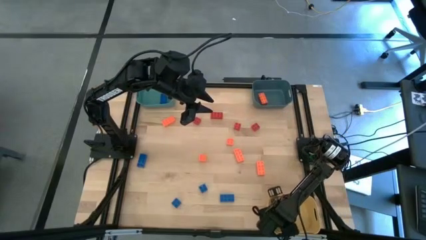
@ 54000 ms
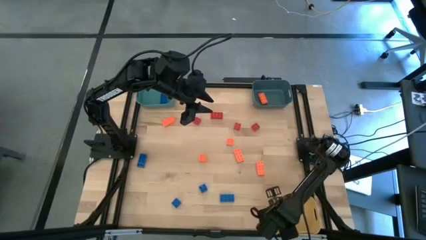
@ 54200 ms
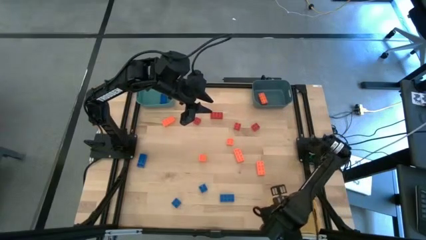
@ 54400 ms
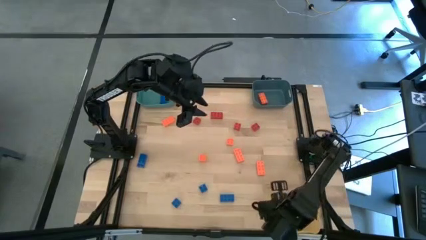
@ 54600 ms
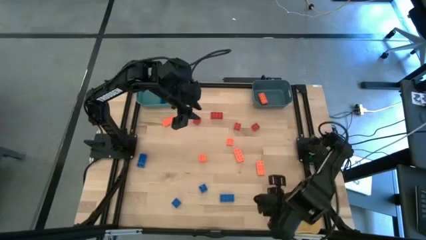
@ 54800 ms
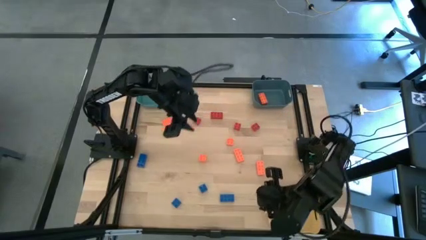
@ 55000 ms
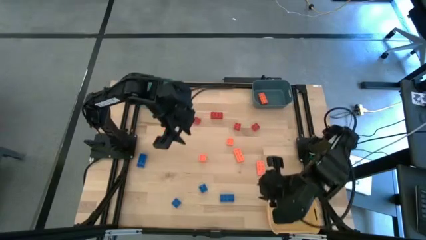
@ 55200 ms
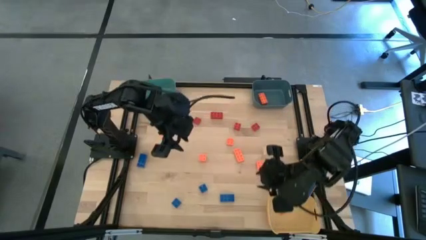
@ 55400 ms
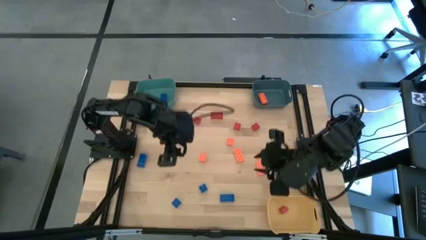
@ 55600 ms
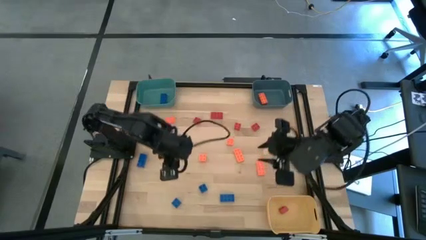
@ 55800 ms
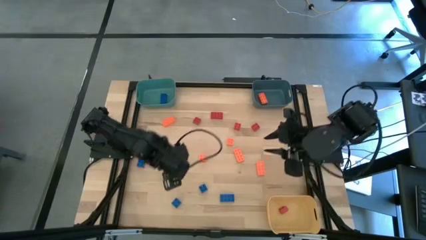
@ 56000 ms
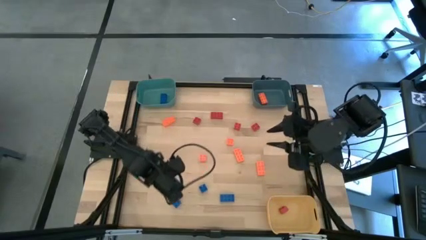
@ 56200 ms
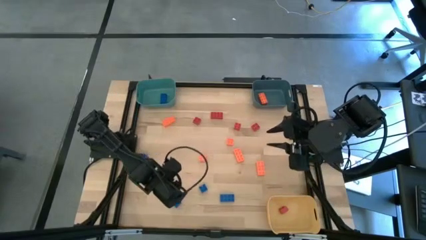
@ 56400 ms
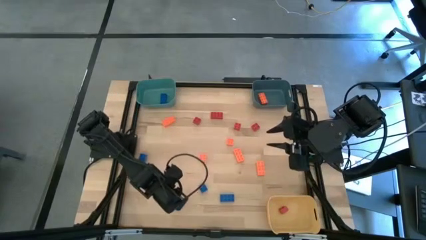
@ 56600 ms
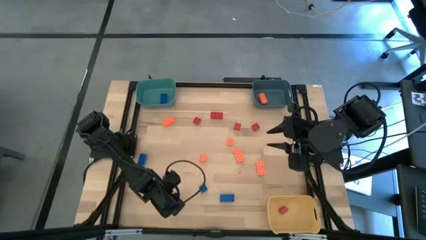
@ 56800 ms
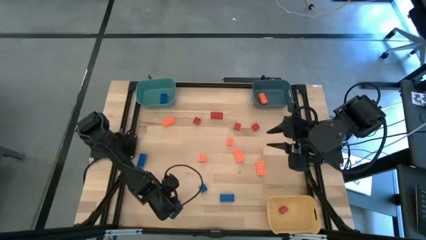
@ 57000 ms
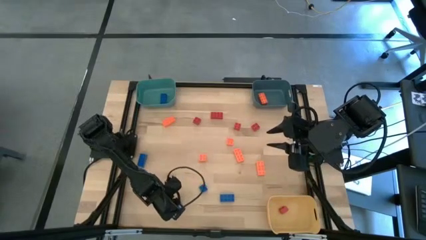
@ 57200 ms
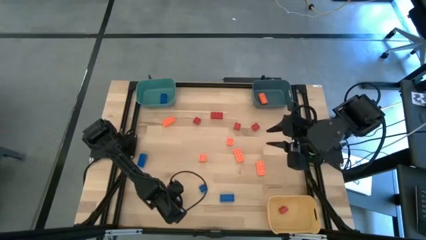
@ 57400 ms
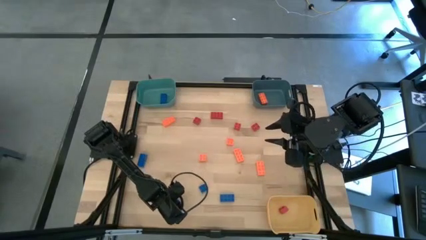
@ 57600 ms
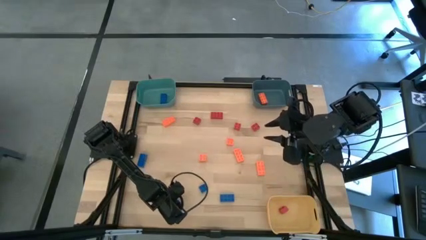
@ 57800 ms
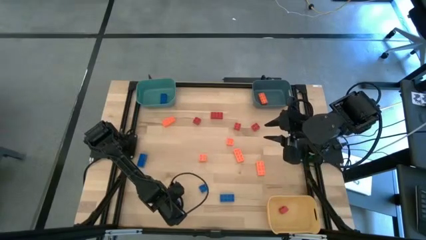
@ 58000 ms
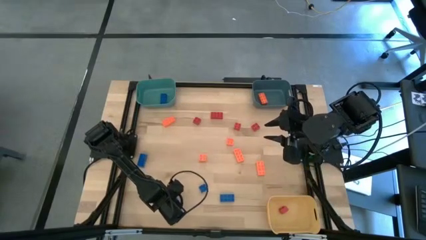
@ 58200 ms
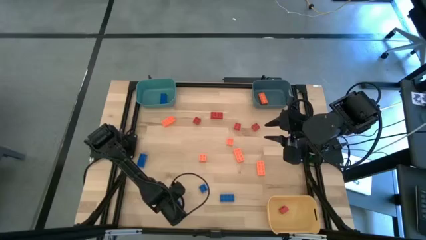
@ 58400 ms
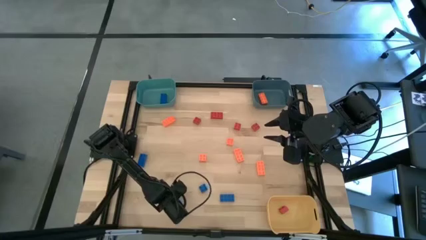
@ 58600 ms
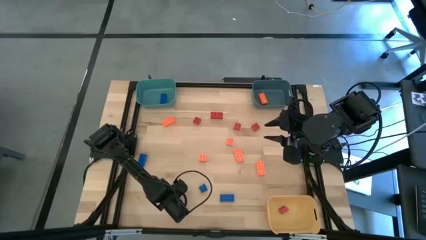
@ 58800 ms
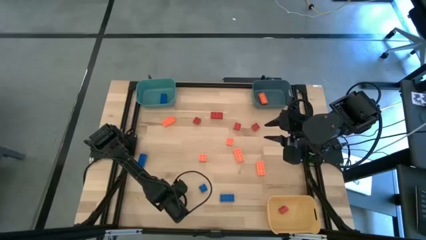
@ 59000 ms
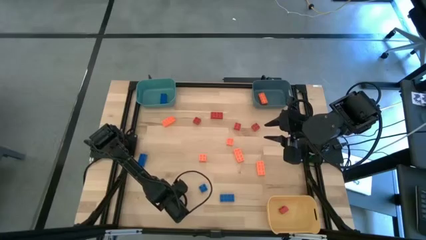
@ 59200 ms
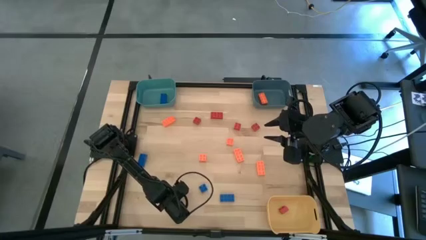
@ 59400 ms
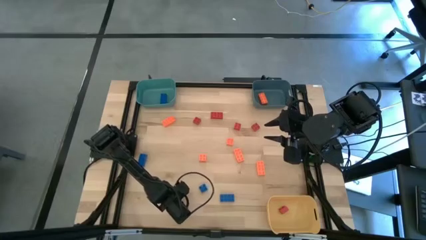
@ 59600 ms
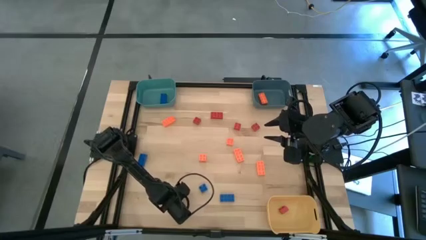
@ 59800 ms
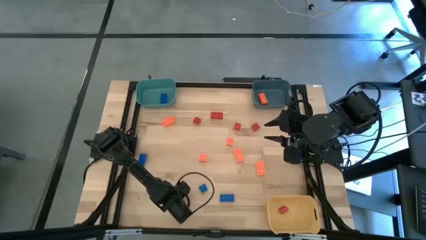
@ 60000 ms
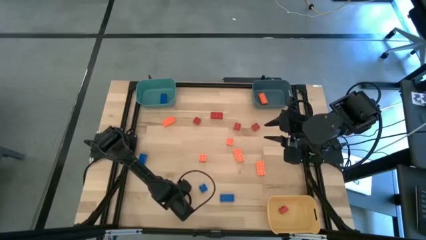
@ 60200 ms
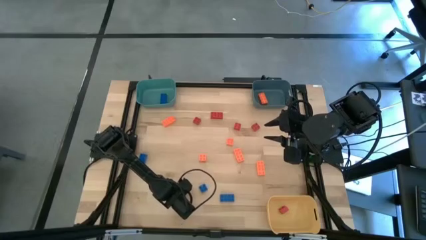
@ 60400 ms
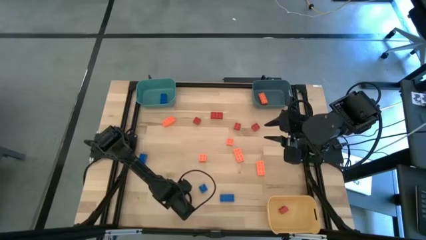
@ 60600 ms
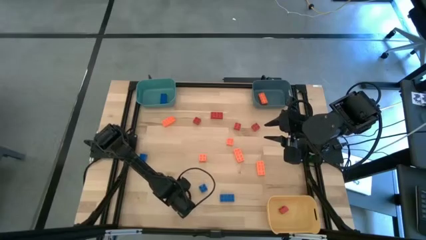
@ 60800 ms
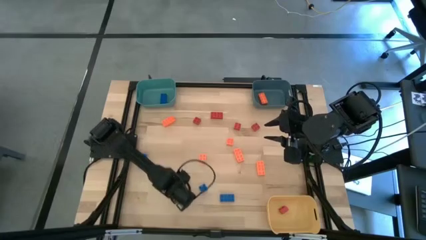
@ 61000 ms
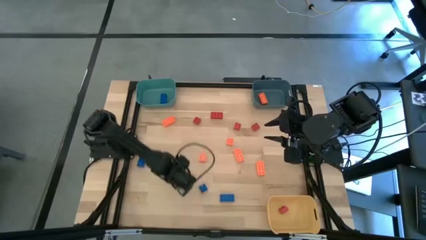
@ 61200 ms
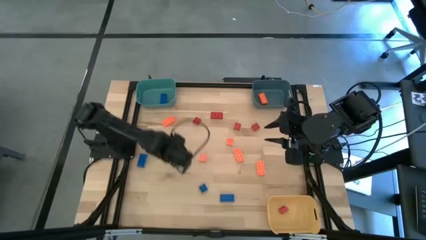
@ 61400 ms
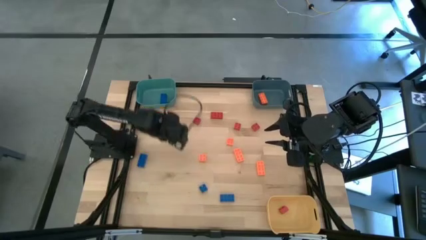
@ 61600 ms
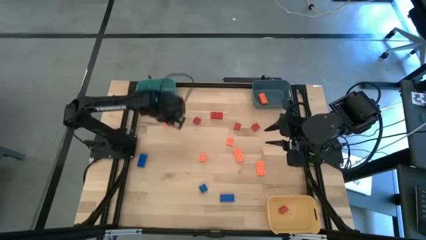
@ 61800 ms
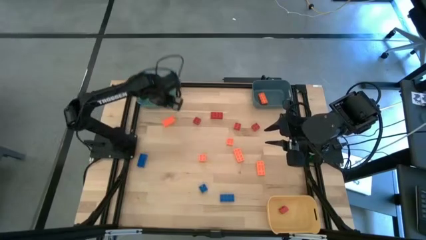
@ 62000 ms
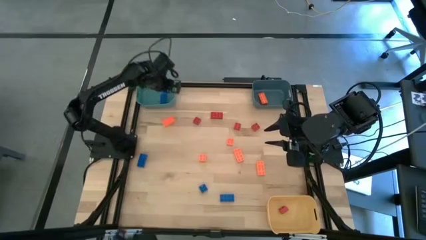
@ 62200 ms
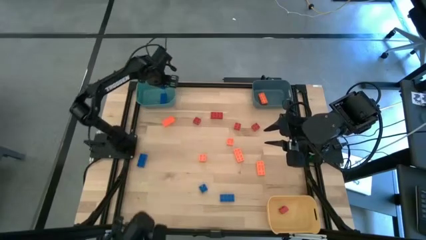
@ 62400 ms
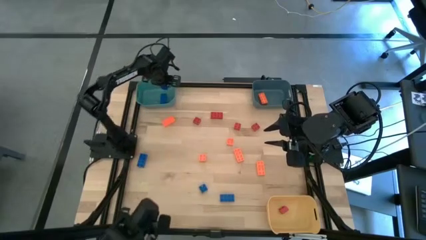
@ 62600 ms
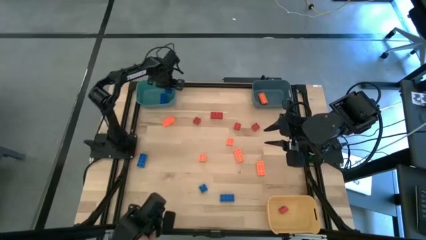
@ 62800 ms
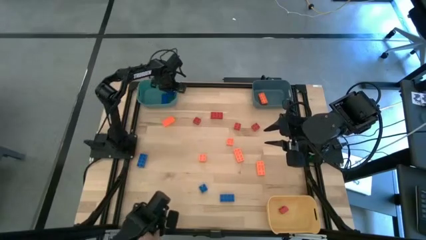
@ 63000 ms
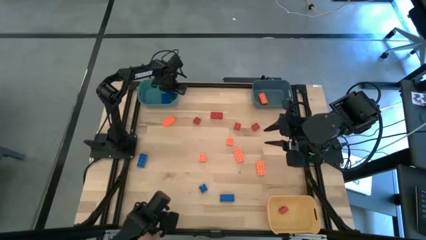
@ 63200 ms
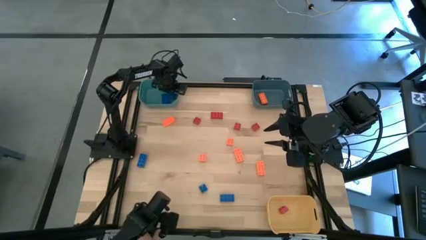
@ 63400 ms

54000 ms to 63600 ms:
Task: Sort & place blocks by color
Put the blue game piece into the green bin

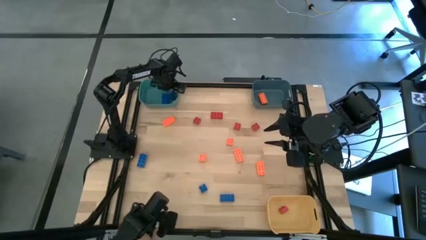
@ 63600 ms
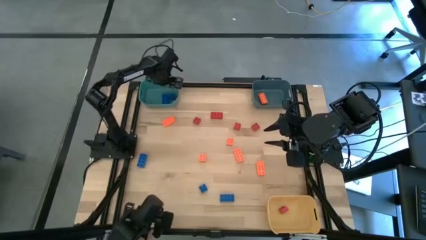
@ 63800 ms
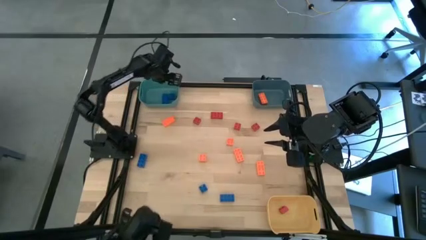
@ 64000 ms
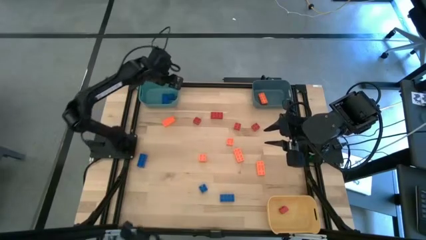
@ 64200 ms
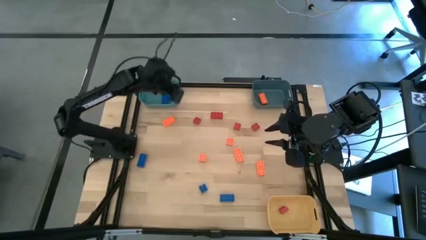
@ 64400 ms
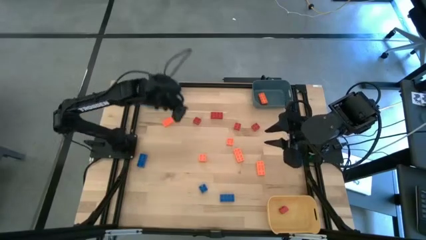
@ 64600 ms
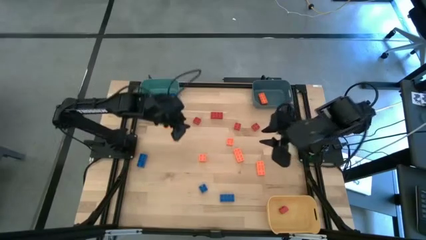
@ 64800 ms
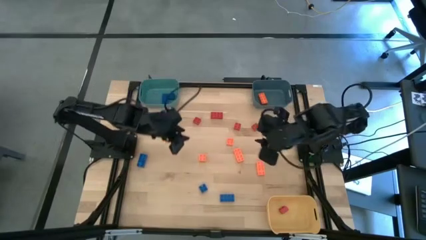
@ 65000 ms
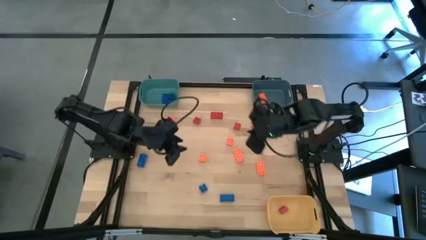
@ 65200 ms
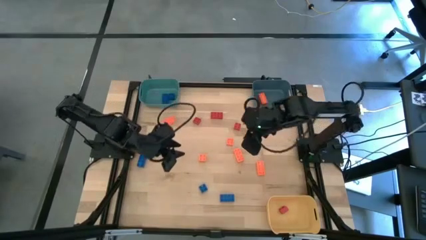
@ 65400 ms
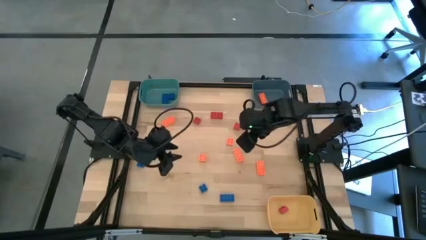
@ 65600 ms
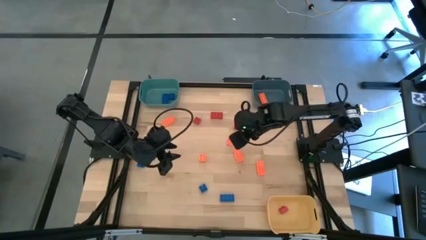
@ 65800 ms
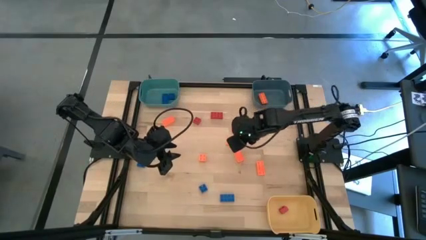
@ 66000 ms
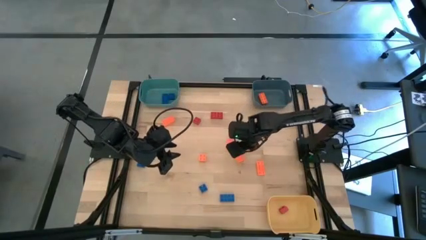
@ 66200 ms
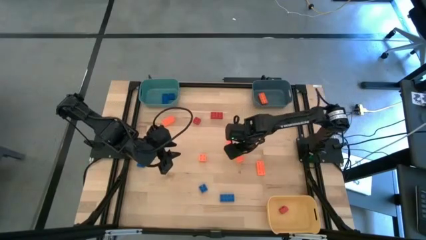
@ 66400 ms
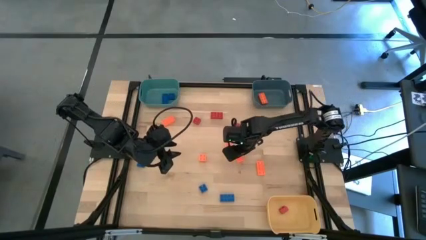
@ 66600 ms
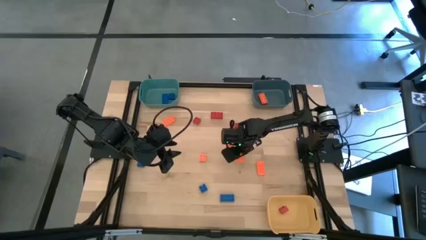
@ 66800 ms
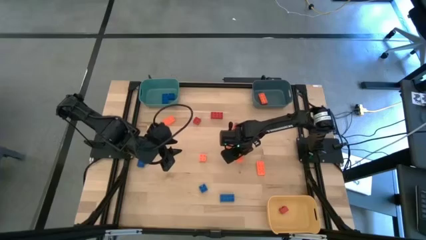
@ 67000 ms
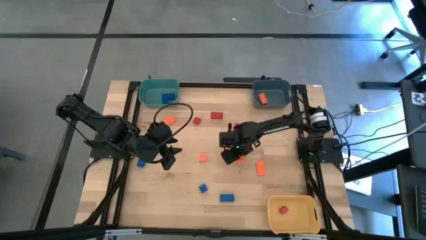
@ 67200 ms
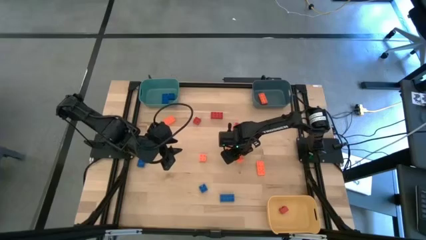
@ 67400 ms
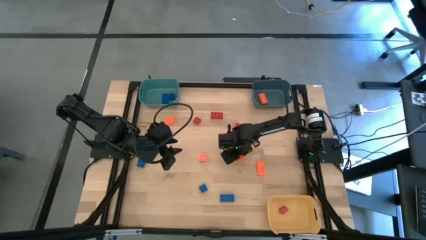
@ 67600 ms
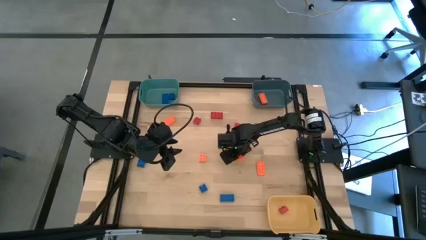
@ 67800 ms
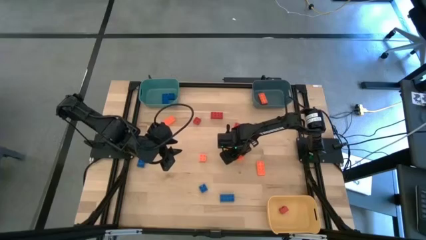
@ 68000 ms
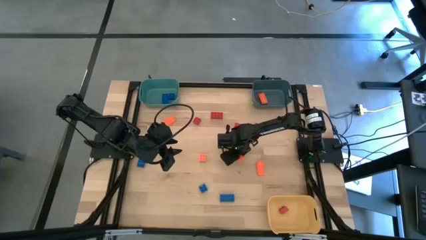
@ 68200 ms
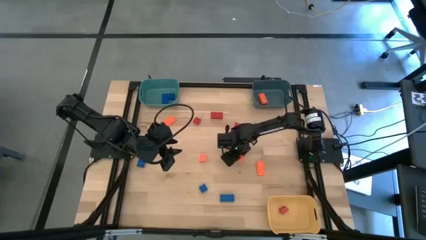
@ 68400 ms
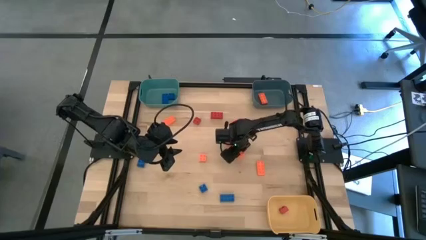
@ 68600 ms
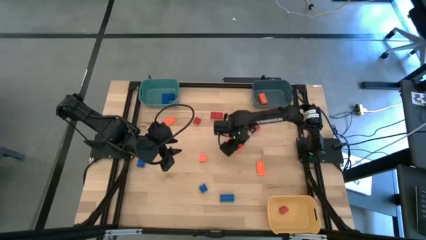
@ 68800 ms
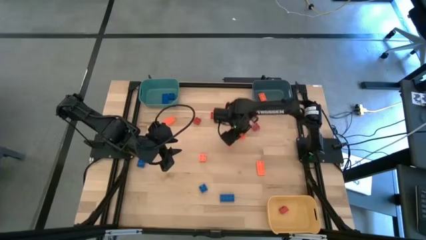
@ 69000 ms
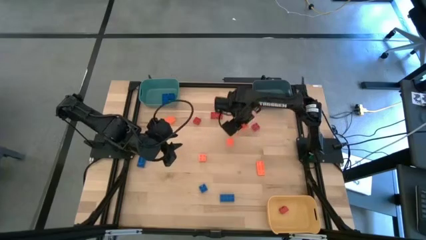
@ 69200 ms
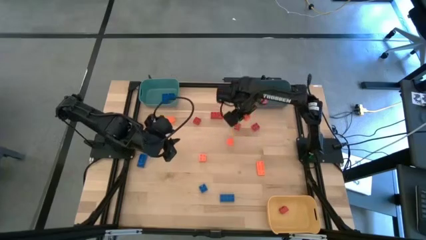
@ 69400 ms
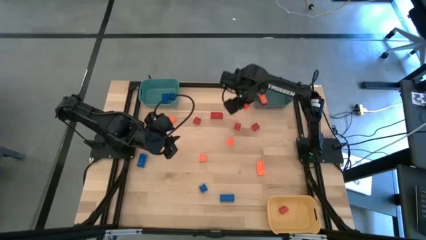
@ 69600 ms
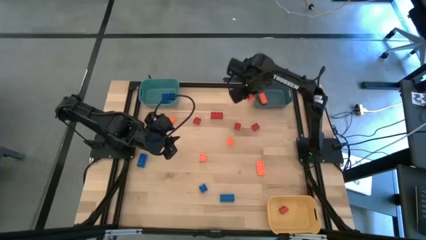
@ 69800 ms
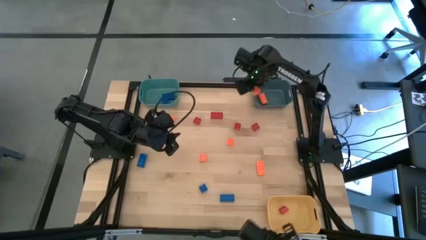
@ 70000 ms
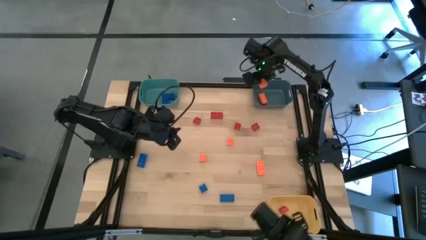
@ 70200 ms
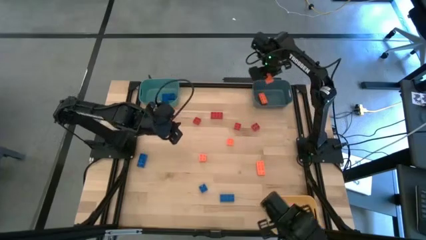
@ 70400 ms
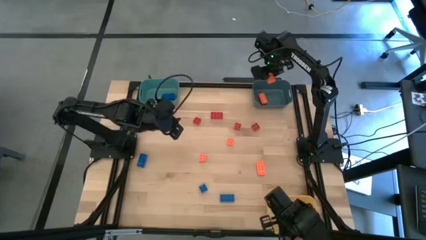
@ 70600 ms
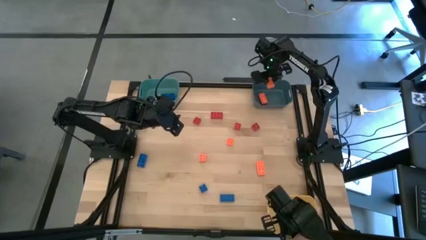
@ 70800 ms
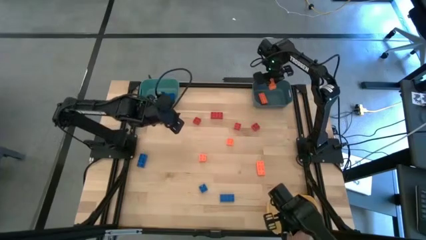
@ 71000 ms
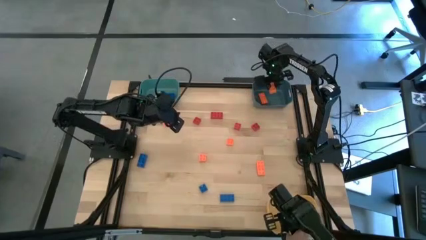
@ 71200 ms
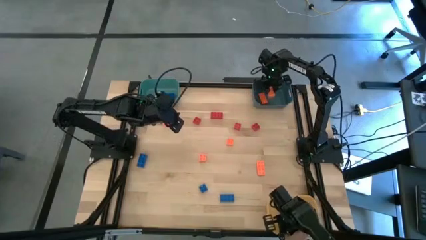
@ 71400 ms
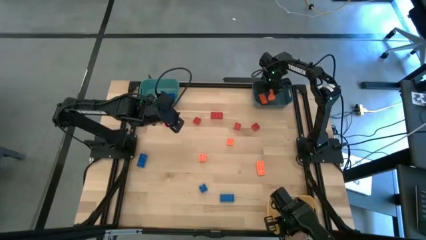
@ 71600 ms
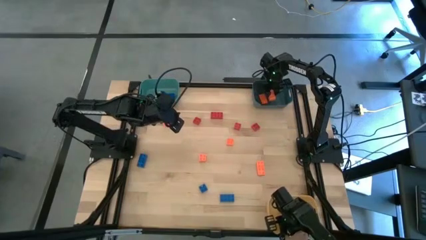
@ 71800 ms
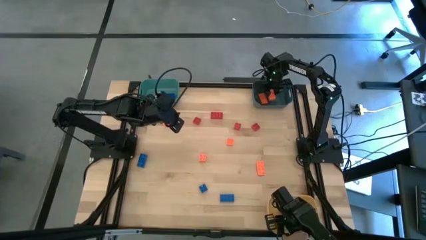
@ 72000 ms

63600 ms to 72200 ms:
Put the orange game piece into the blue bin
